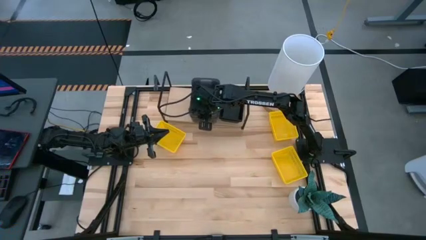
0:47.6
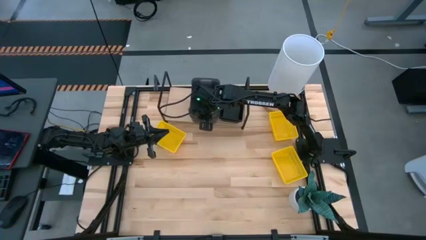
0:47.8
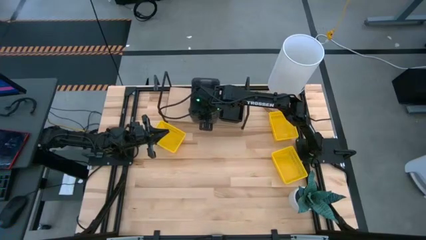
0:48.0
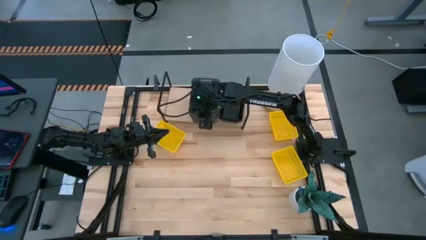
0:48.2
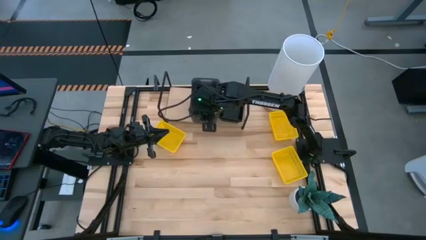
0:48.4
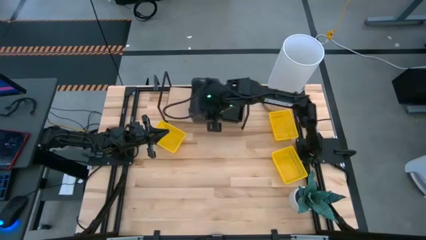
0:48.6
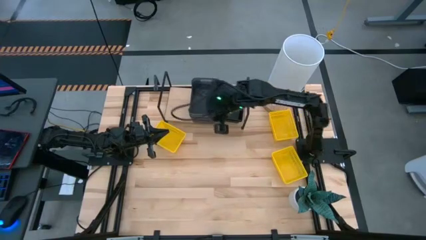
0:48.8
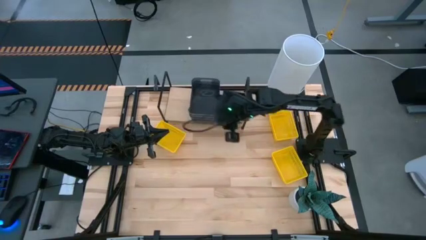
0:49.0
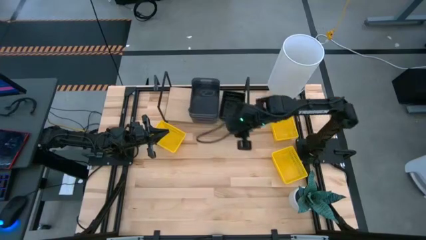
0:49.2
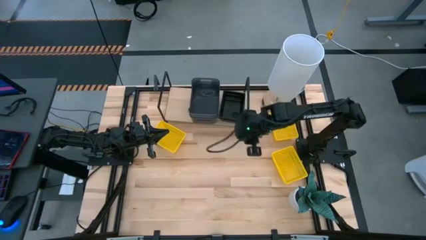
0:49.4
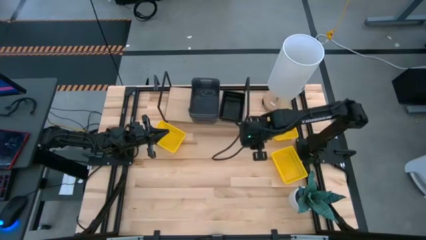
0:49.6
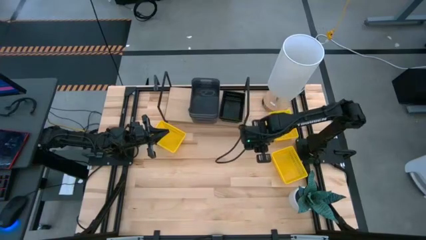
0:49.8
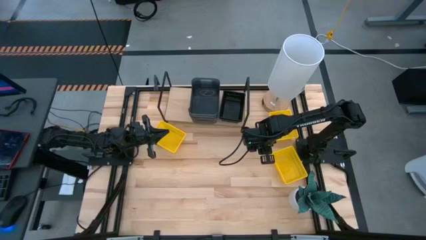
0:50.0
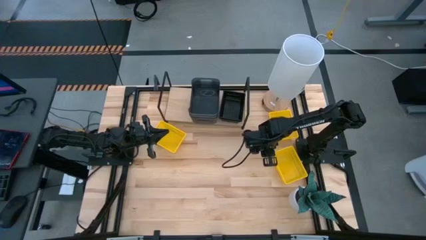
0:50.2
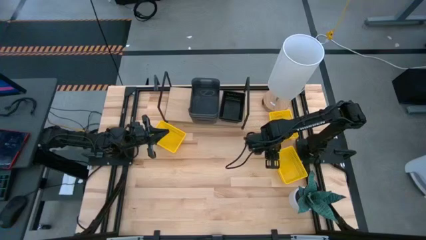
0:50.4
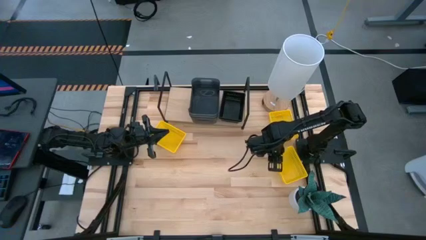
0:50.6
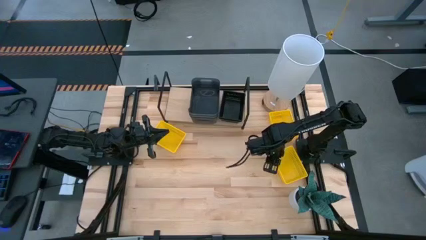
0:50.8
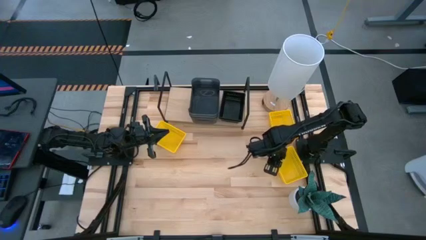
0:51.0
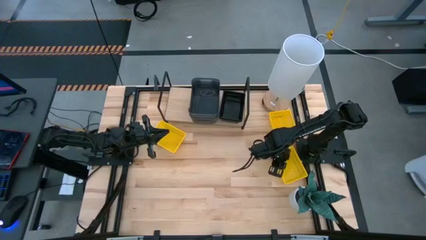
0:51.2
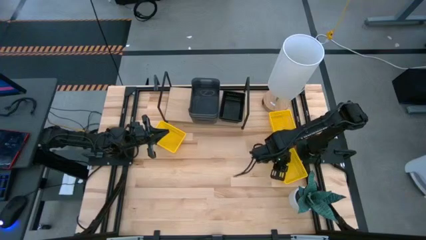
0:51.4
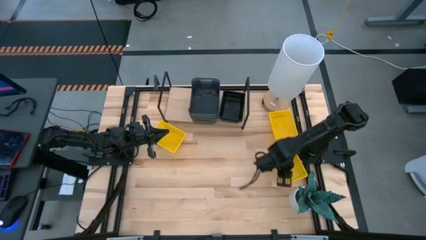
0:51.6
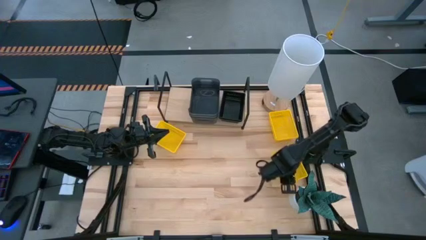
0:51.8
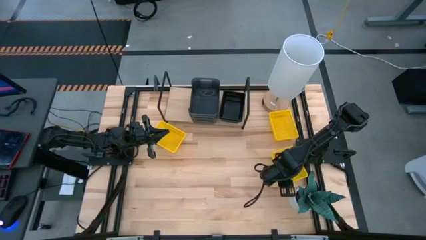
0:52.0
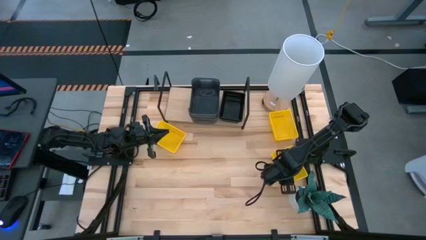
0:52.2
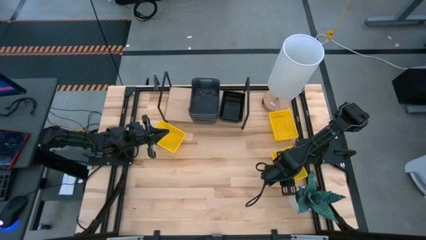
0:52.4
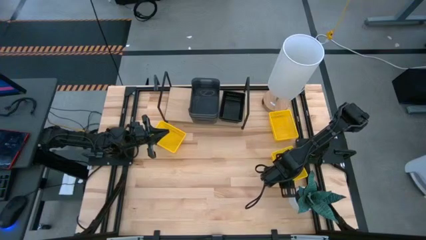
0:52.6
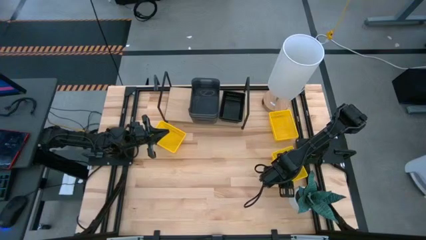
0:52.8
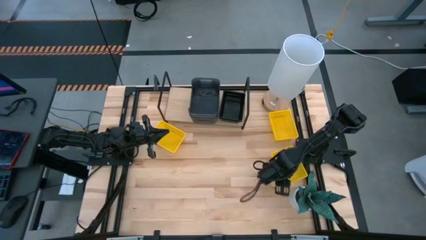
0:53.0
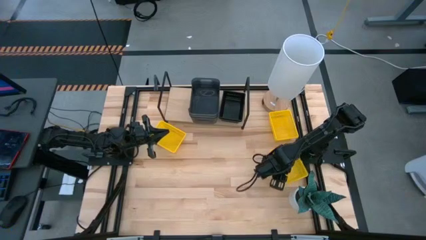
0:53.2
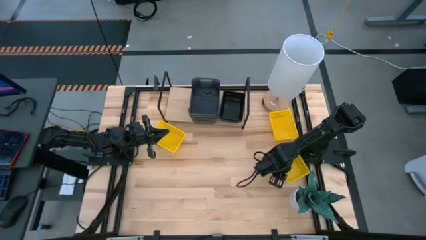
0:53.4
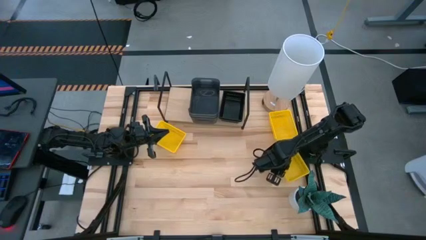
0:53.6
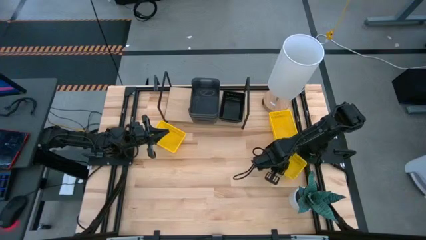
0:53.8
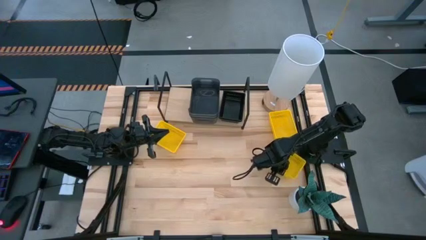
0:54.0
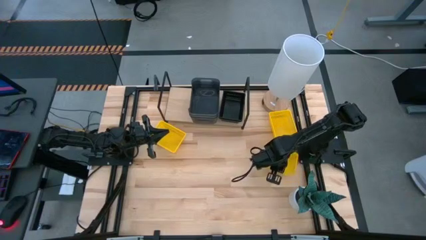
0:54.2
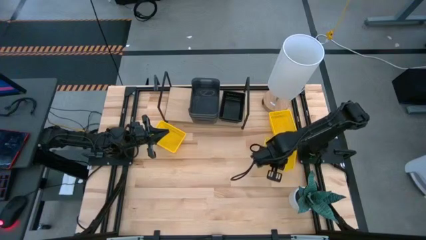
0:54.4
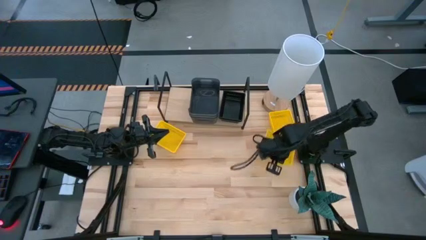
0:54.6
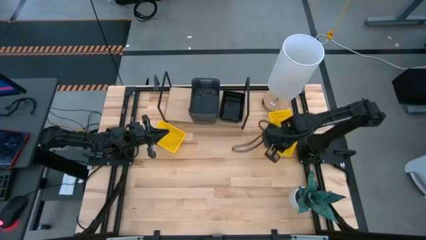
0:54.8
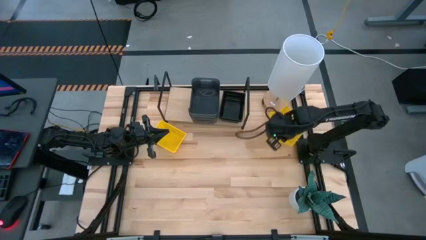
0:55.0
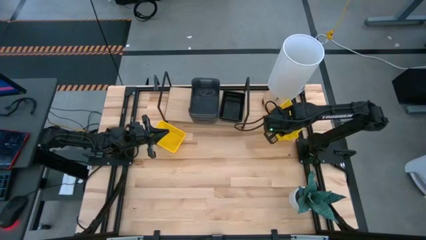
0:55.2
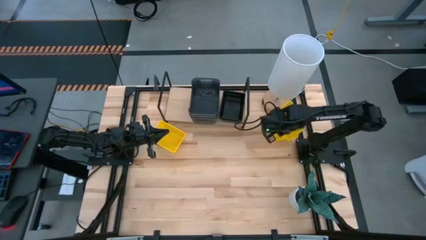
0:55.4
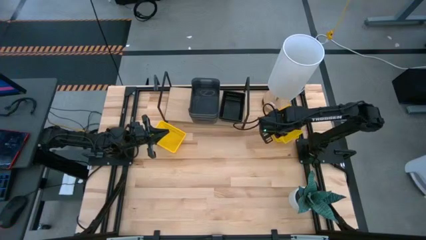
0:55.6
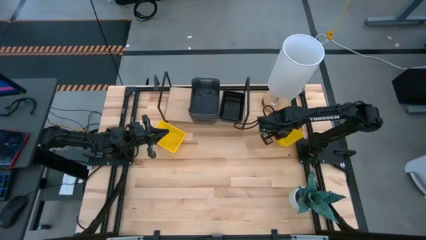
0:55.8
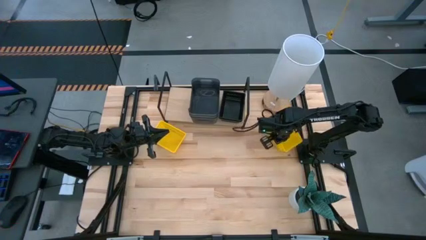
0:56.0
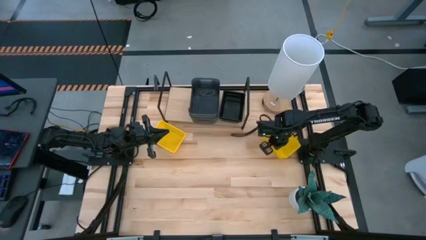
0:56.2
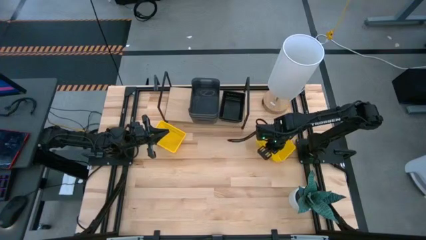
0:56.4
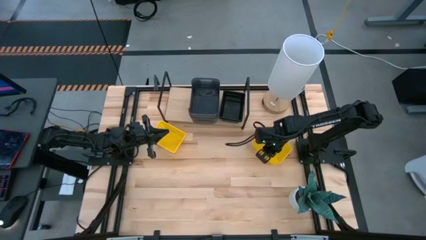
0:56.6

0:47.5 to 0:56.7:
Task: Stack baskets on shelf by color
Stack the yellow bin on the top of the yellow bin

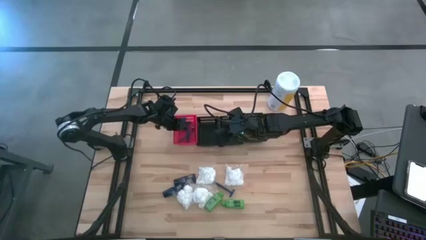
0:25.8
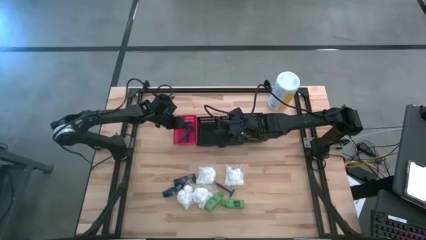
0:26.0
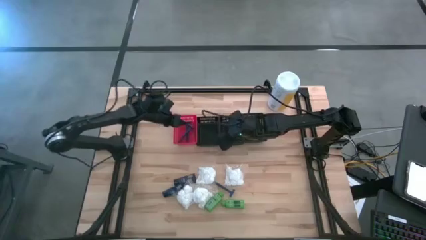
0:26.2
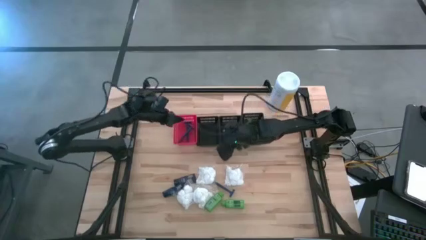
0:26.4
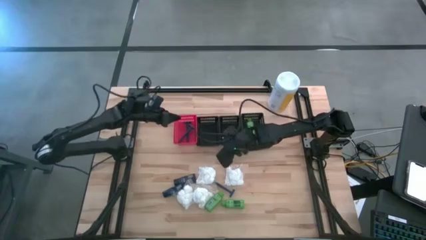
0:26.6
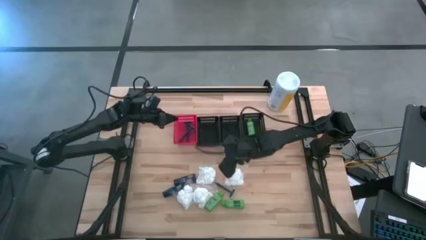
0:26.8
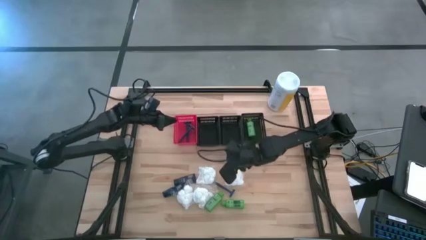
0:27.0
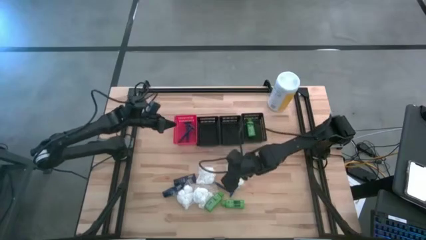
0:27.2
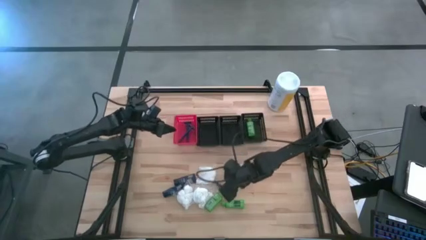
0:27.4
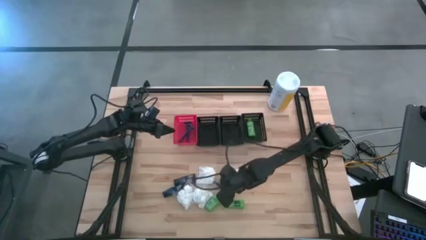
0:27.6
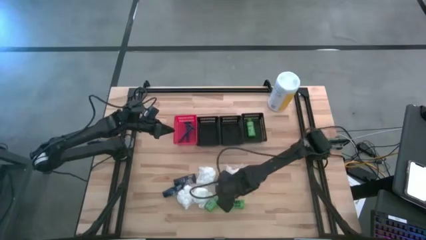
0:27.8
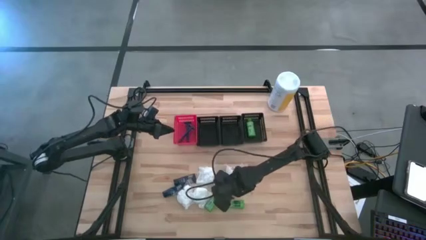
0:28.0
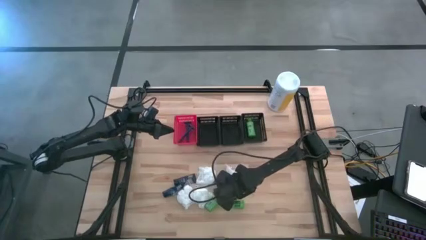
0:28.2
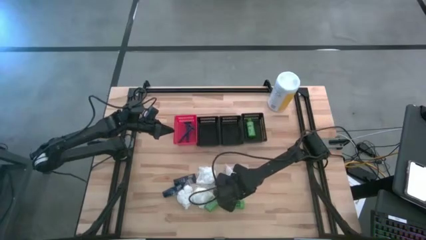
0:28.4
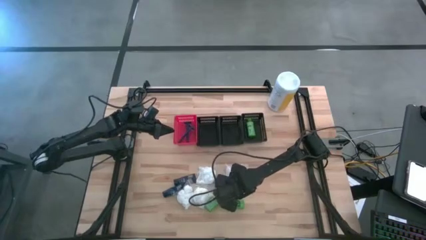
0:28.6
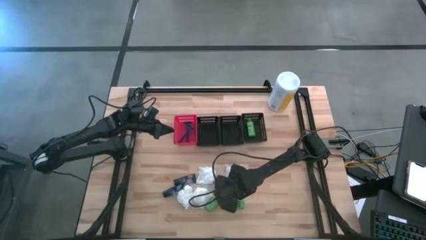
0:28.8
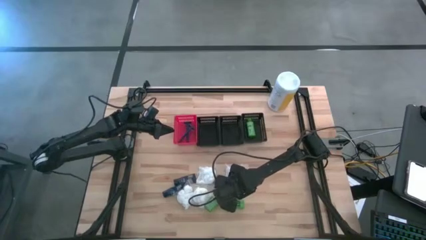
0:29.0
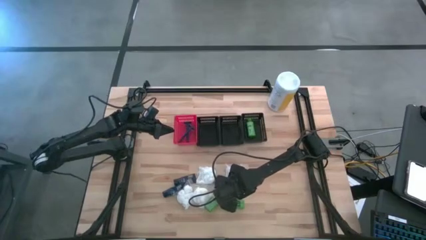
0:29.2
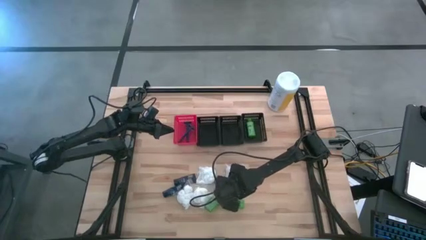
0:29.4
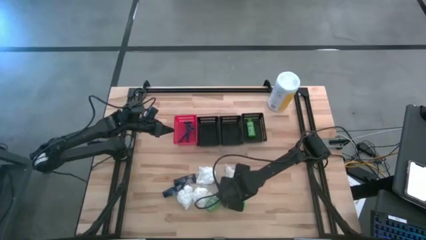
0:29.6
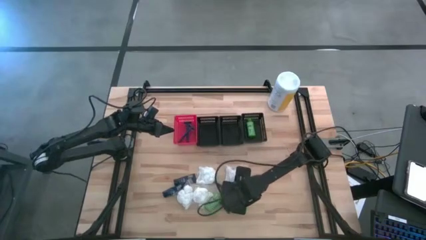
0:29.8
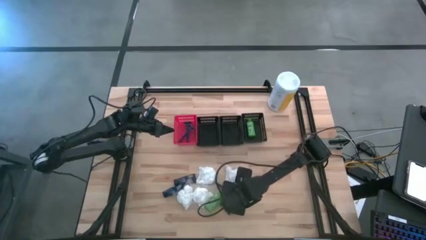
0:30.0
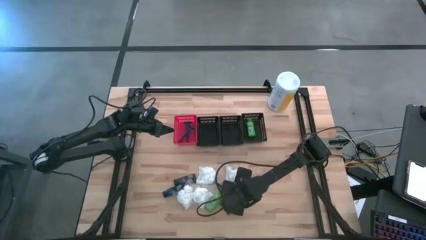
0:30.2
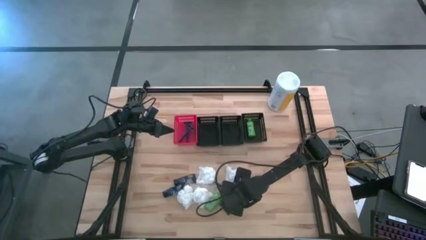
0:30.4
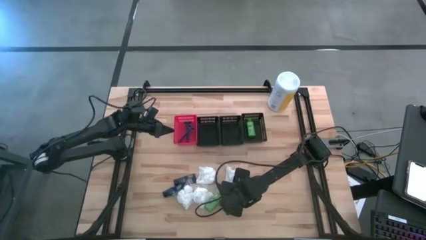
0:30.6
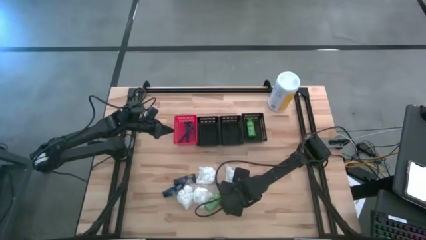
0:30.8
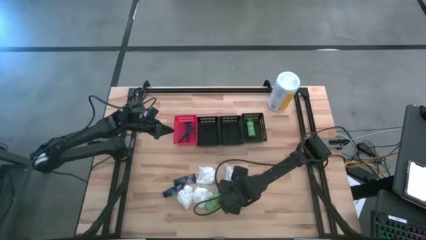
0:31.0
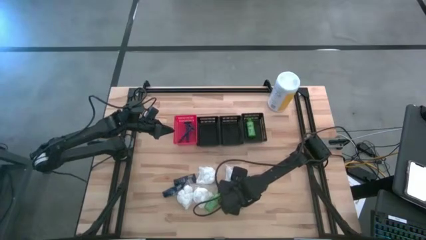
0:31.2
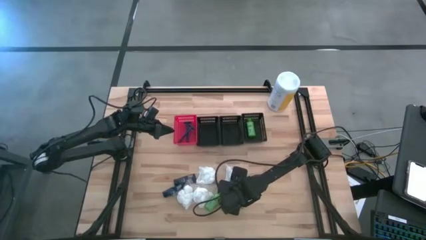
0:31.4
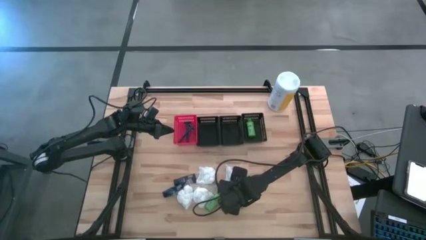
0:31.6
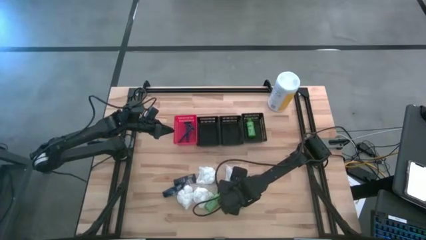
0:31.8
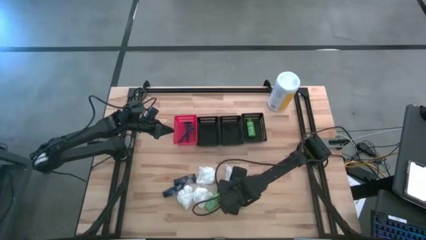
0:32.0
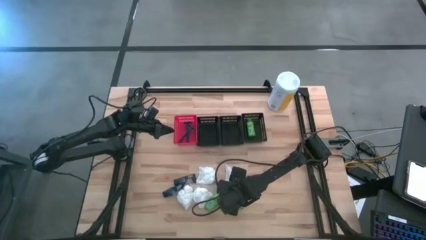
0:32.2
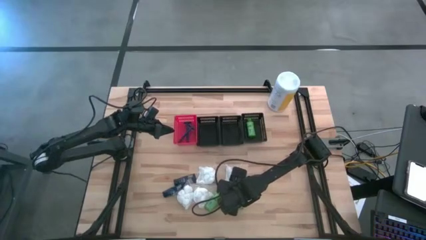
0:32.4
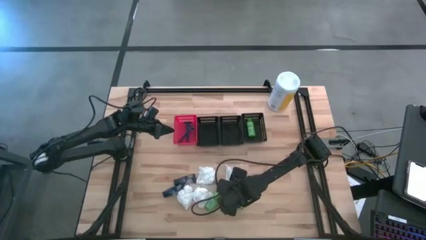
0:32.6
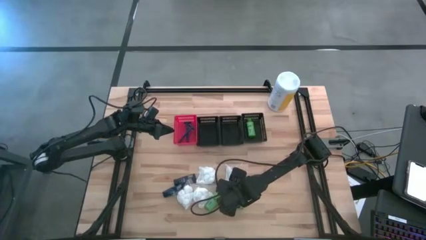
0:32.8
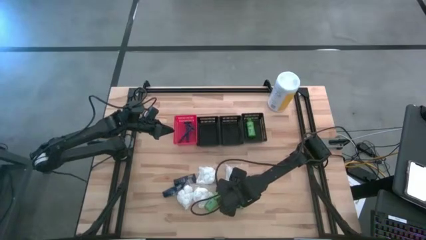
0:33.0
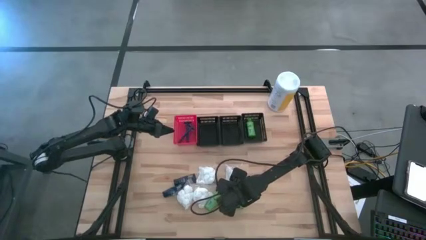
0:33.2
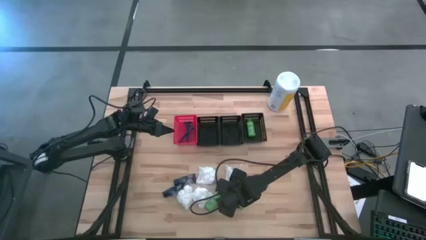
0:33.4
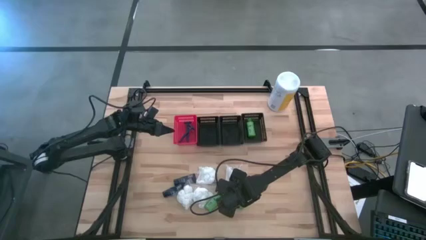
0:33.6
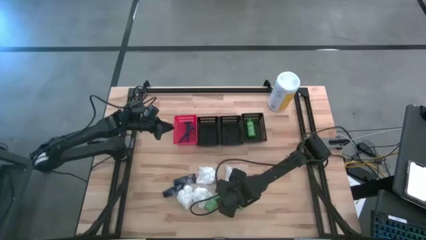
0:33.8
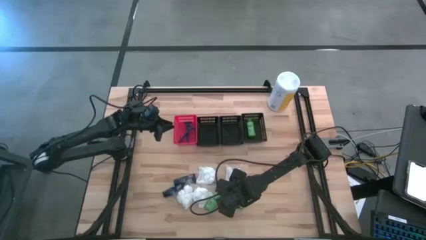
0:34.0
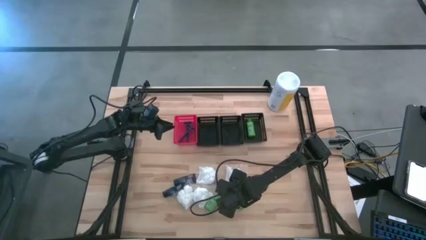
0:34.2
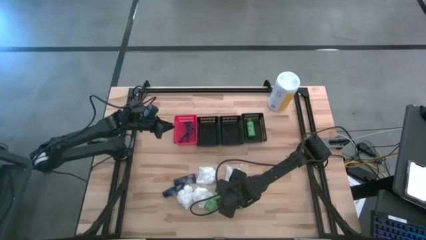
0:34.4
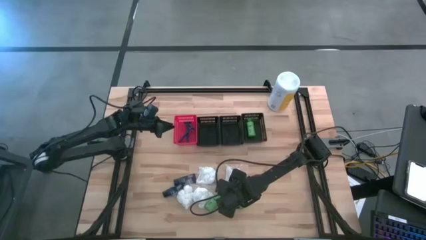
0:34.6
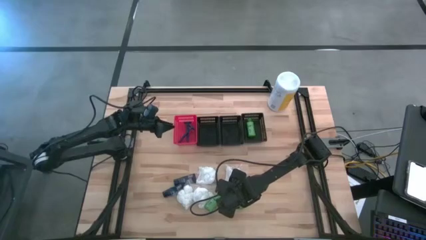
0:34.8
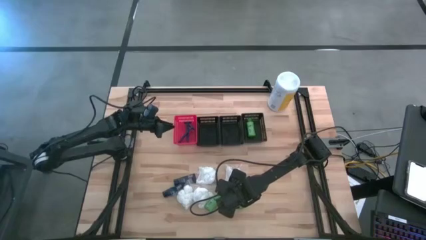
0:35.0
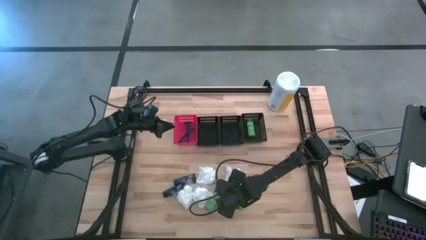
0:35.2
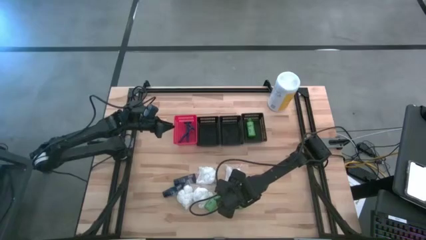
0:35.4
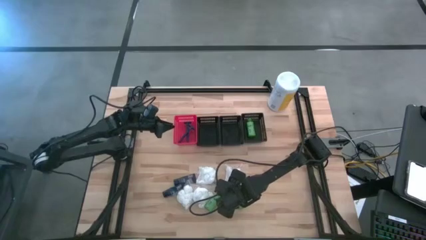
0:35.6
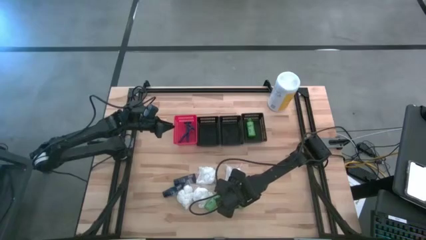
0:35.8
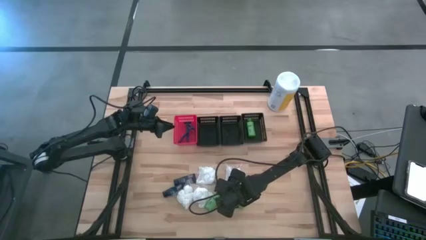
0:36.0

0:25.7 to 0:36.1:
Task: Pick & Place Travel size toiletries
Put the shampoo into the right black bin
